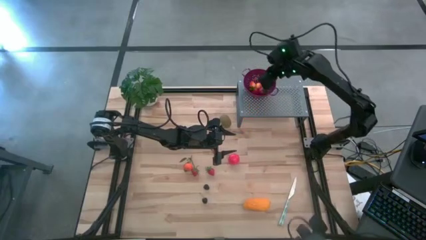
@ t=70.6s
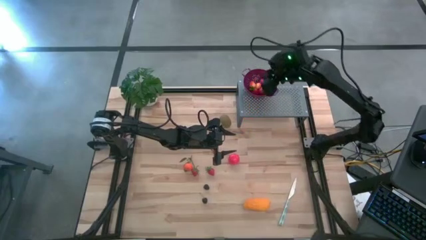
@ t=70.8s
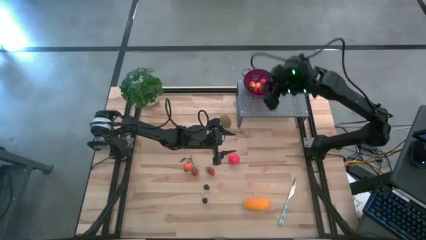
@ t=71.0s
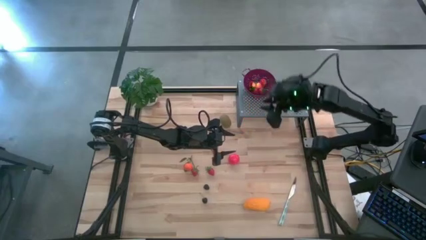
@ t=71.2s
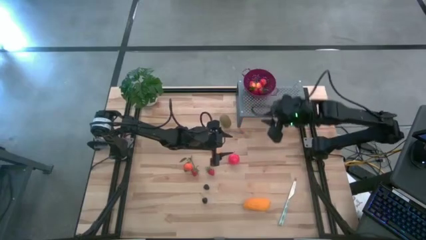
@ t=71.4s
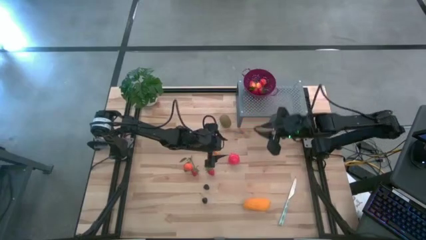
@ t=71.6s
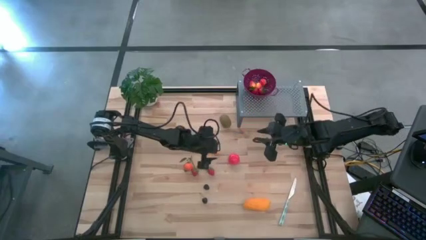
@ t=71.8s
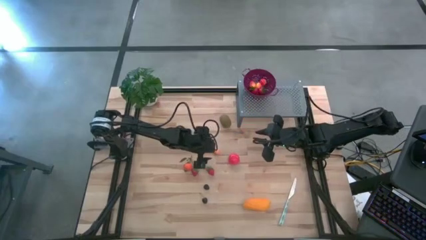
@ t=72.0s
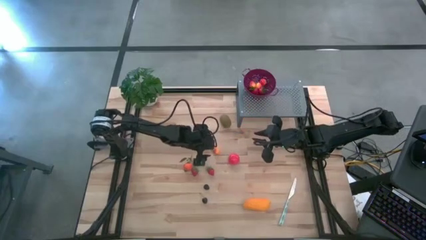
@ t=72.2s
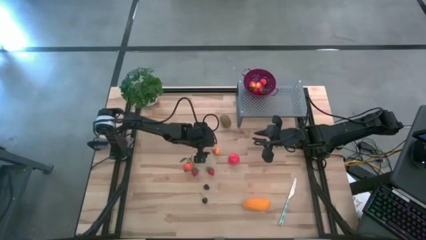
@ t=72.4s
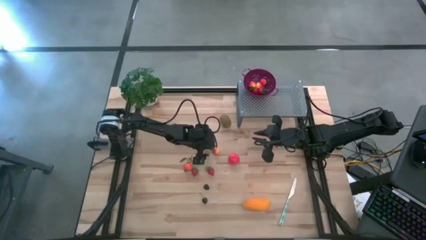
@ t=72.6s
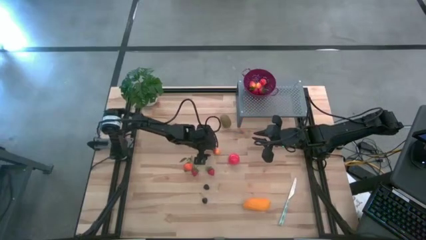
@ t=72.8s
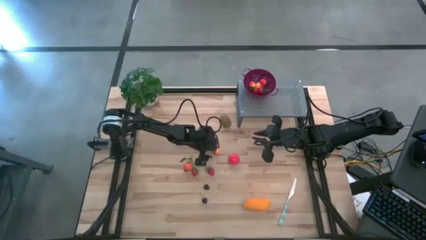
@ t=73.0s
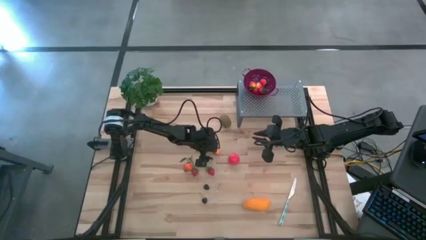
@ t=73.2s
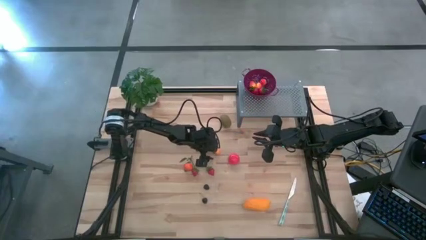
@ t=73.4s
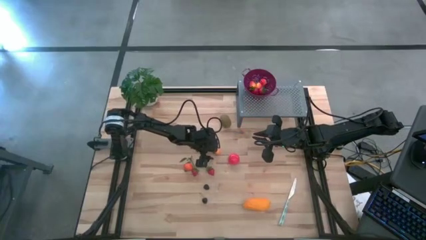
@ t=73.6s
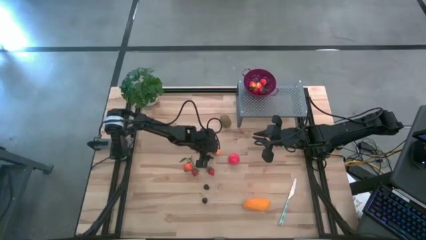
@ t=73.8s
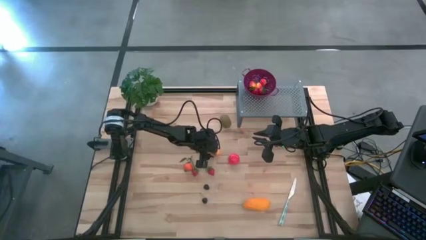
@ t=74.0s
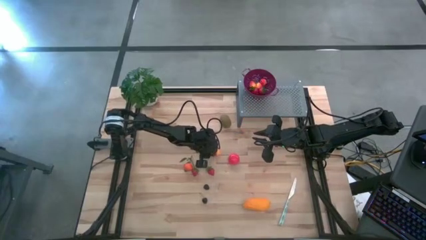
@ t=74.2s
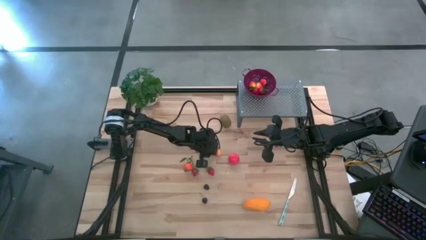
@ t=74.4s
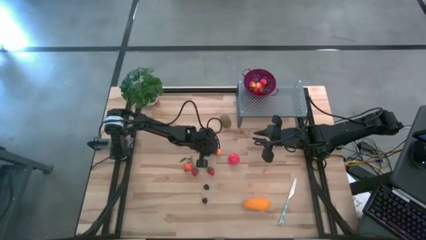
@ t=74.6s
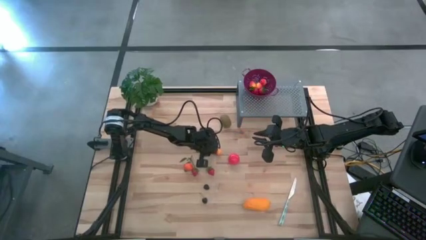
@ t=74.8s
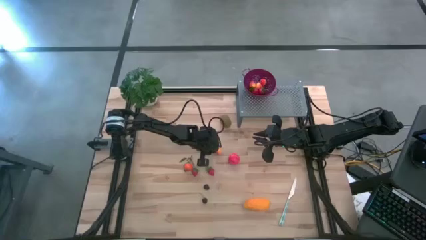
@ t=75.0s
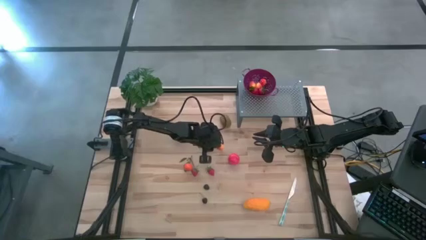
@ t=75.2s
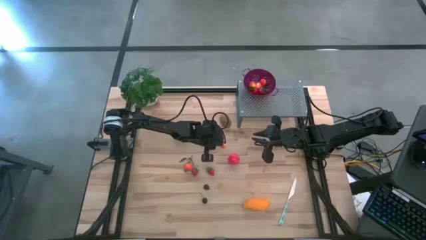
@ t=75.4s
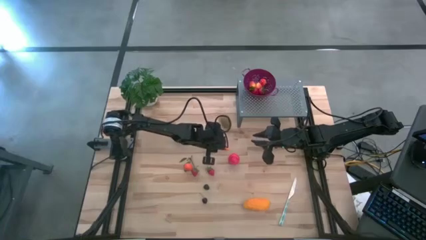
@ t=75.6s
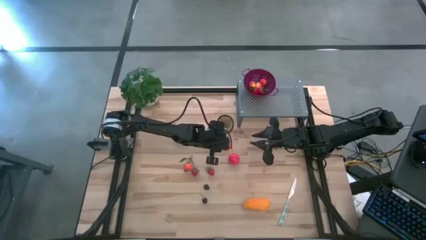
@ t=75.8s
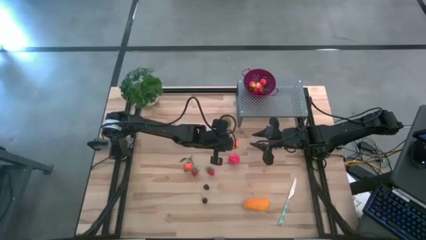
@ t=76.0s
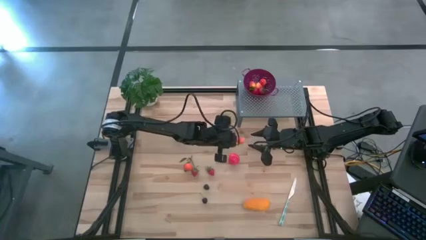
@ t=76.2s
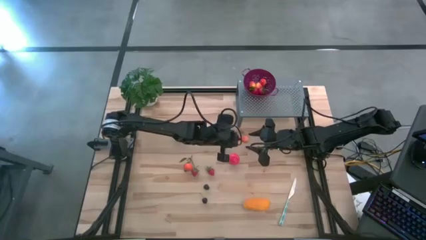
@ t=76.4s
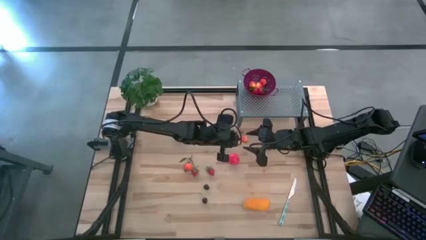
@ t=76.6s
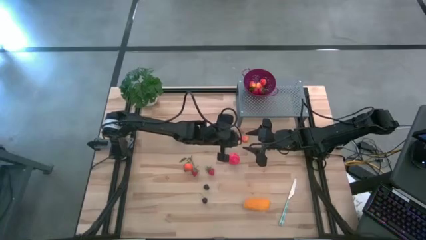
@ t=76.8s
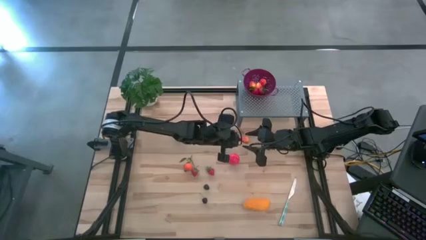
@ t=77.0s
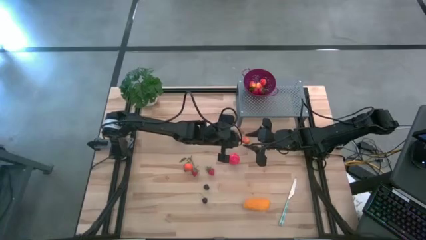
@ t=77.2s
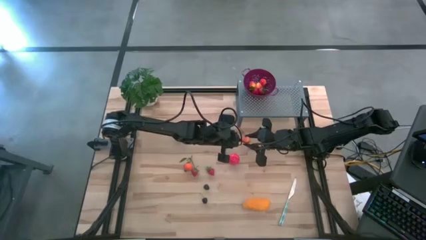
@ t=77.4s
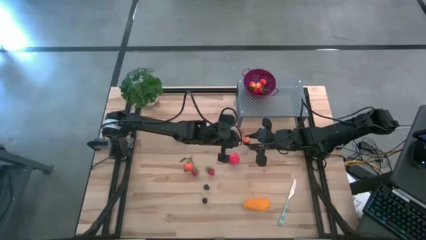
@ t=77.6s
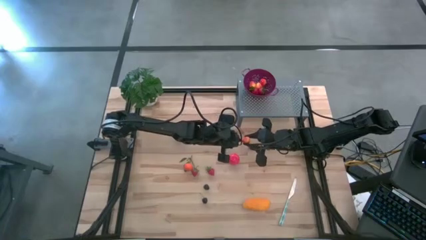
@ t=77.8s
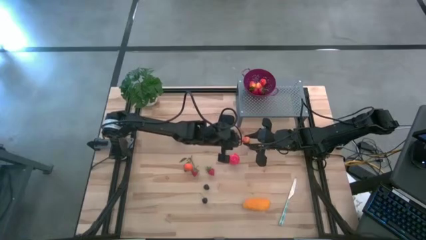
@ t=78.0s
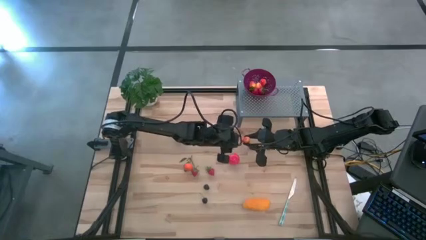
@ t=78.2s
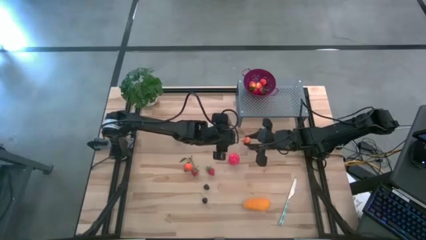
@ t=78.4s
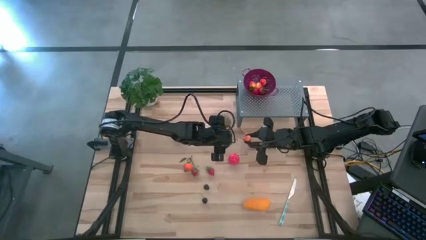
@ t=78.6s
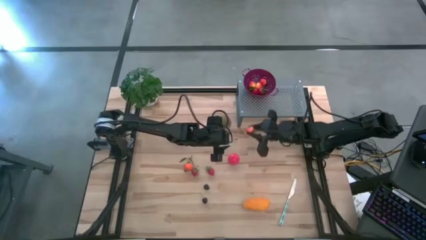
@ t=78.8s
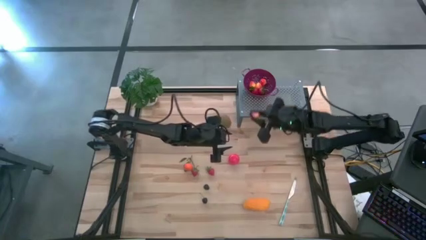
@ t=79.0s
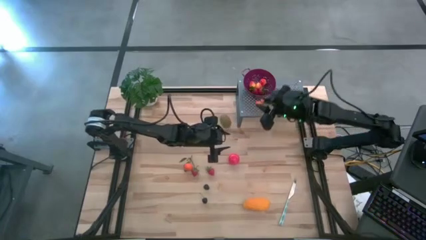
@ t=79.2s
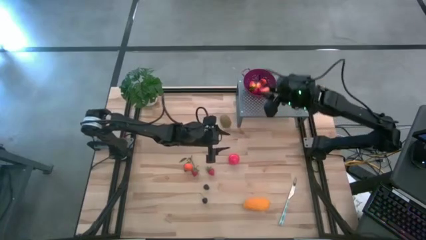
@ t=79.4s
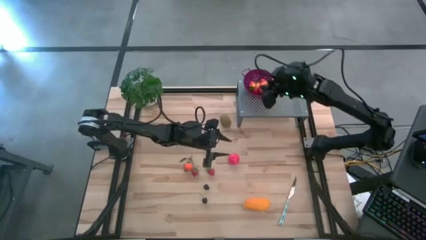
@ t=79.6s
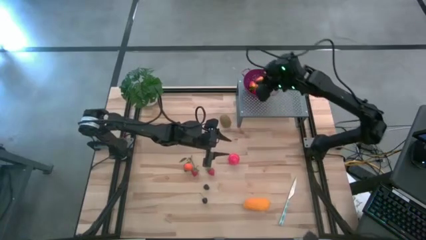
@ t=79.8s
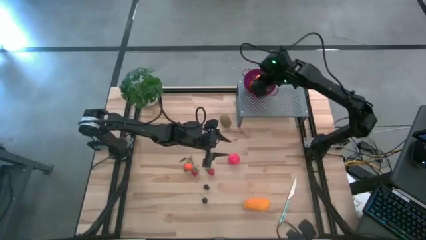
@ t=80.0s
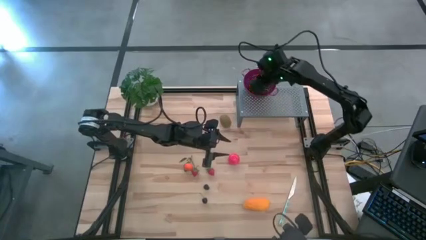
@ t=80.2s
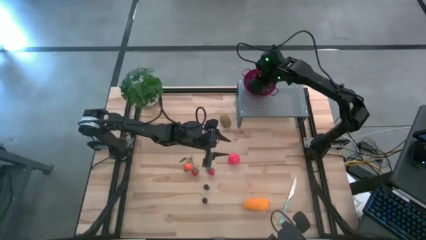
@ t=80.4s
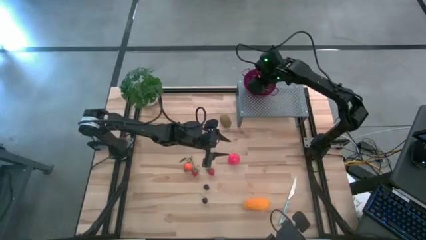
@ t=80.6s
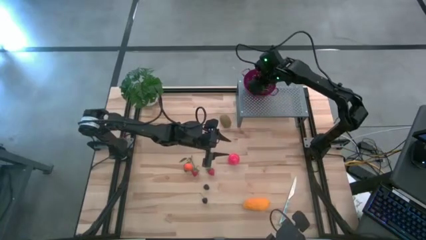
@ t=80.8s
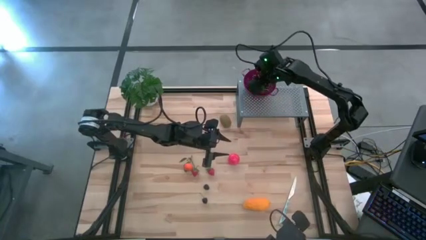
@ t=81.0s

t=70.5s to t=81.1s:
Task: Pick & Place Fruit
Put the peach into the violet strainer bowl on the shelf

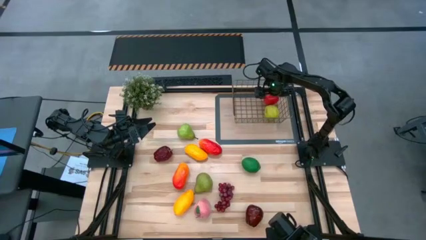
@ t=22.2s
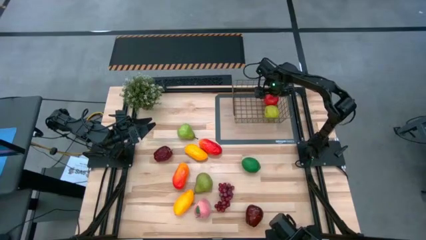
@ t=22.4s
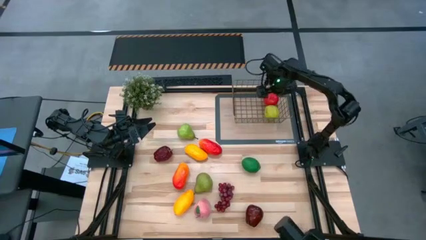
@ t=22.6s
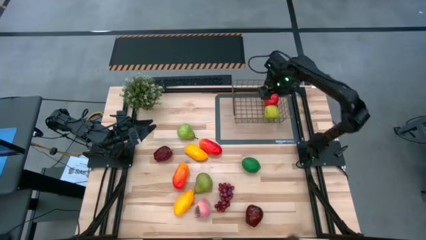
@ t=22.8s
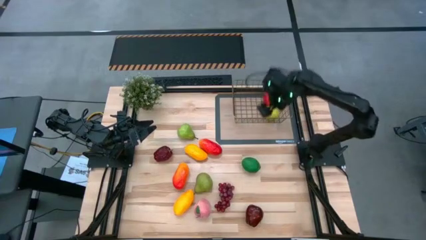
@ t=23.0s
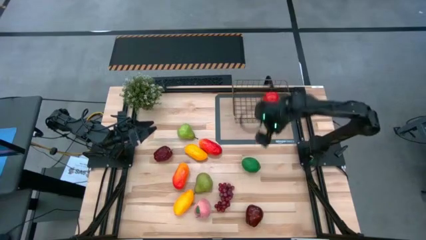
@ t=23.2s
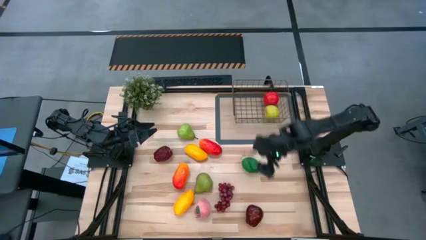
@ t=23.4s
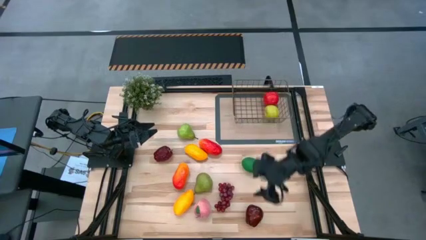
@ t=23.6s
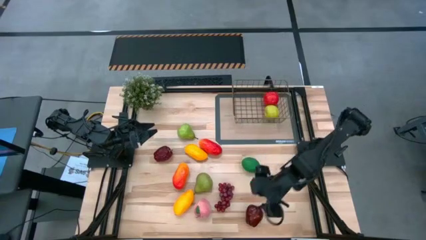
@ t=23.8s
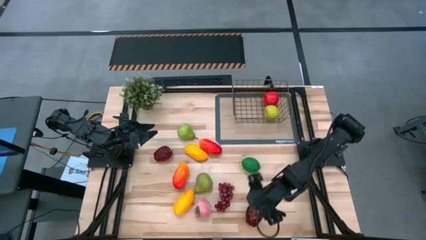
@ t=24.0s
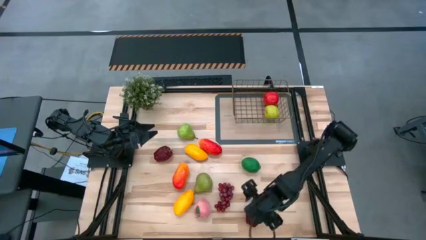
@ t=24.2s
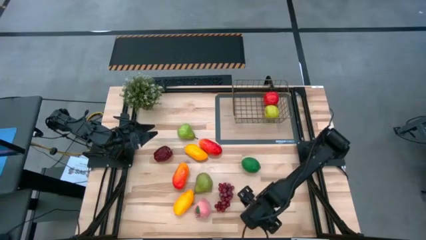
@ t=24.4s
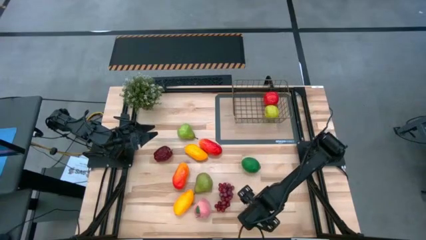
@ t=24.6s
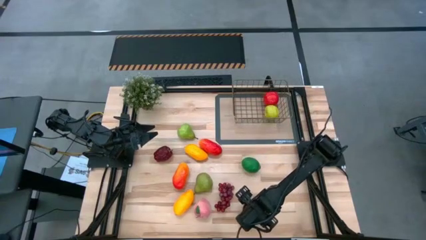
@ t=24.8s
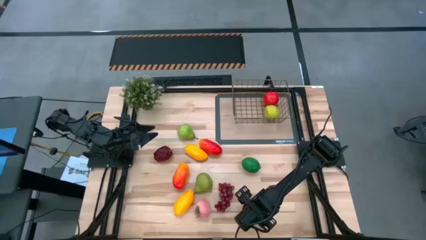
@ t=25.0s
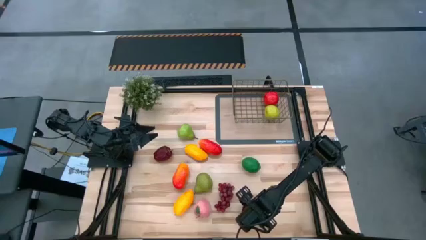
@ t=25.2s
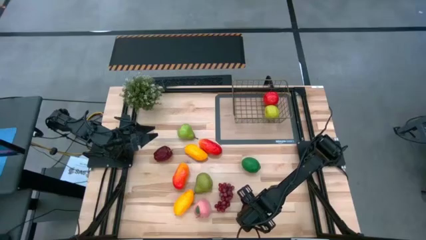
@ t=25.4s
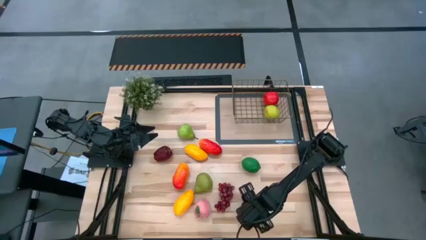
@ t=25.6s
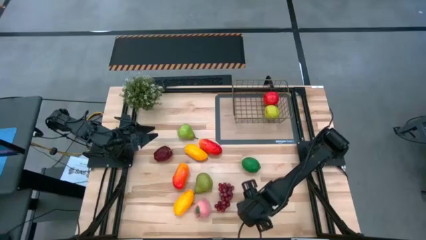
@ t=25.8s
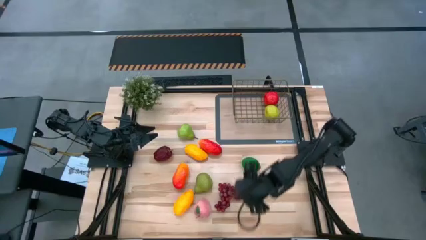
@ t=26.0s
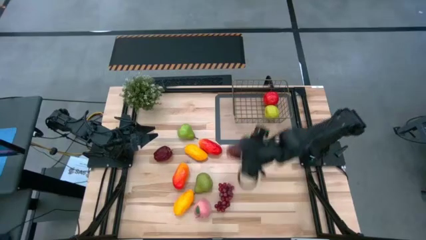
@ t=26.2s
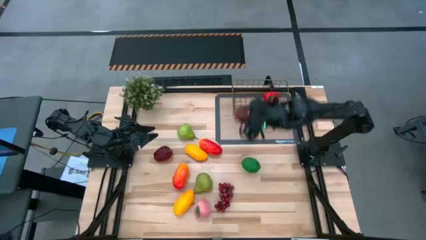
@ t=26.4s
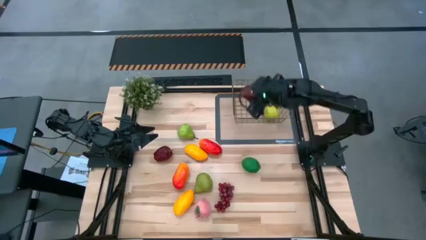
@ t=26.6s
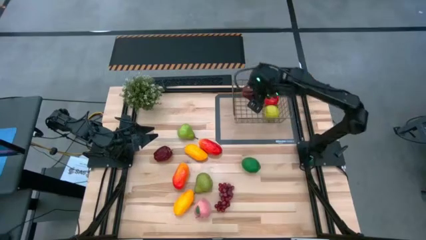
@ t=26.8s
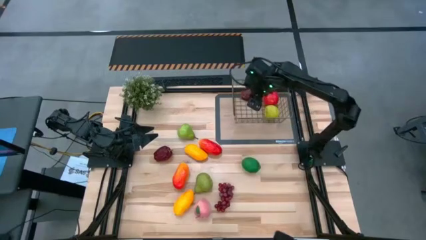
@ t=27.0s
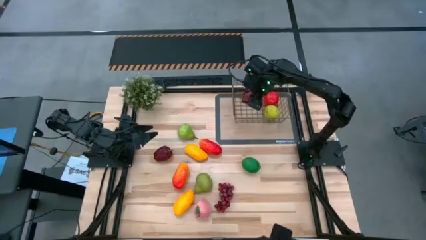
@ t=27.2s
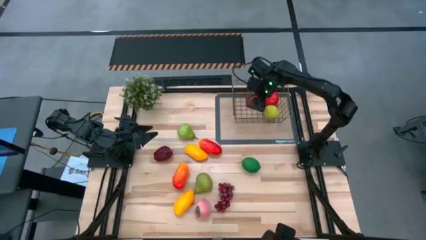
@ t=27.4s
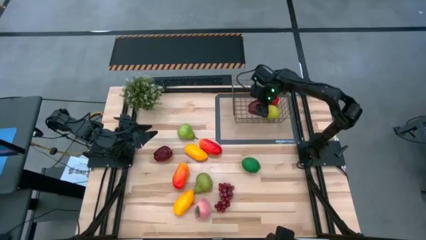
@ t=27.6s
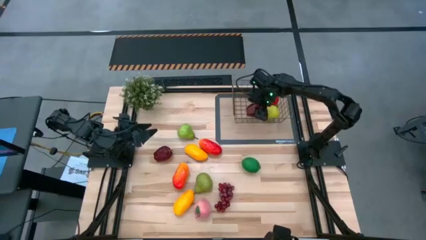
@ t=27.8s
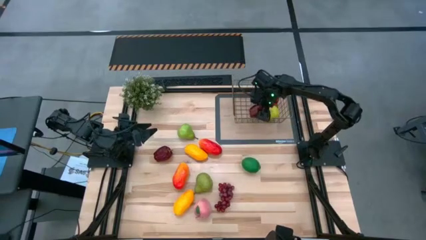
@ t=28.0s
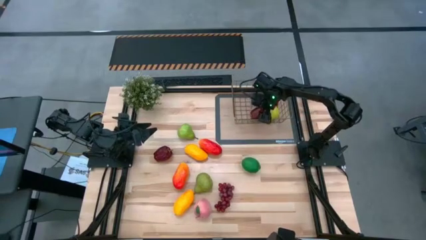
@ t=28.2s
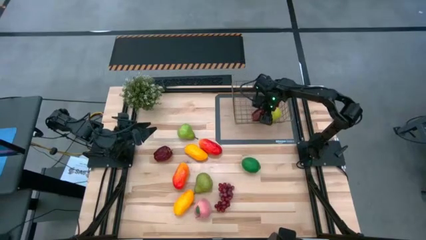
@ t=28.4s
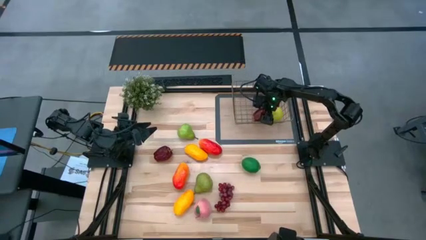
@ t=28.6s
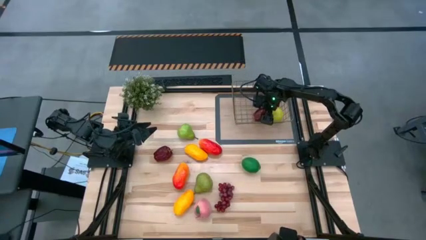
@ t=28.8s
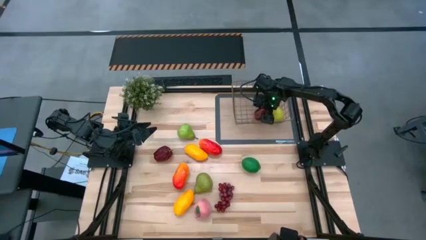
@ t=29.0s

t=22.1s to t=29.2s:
Task: Build produce basket
Put the dark red apple into the gold wire basket
